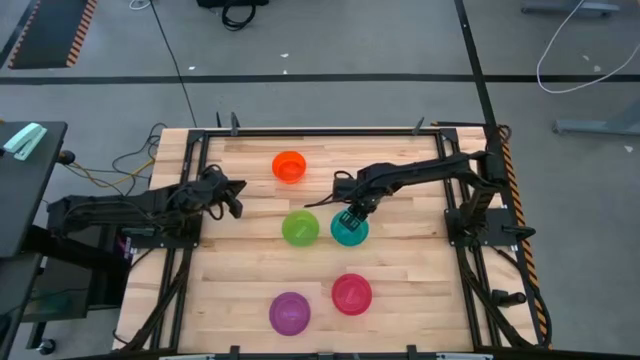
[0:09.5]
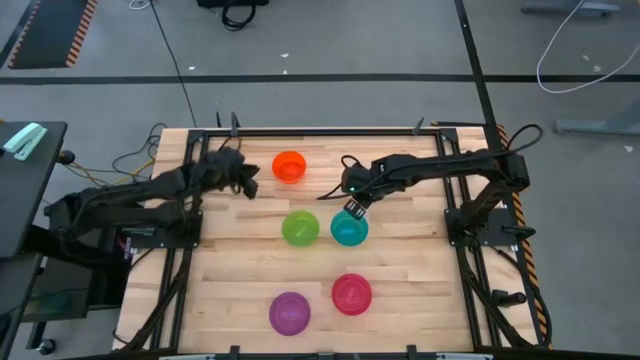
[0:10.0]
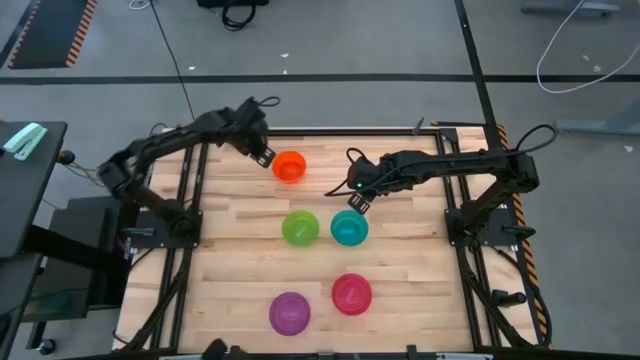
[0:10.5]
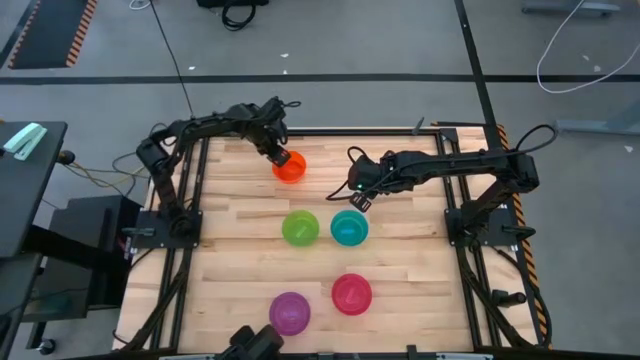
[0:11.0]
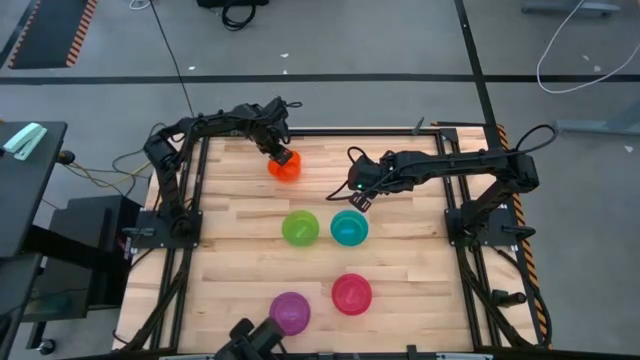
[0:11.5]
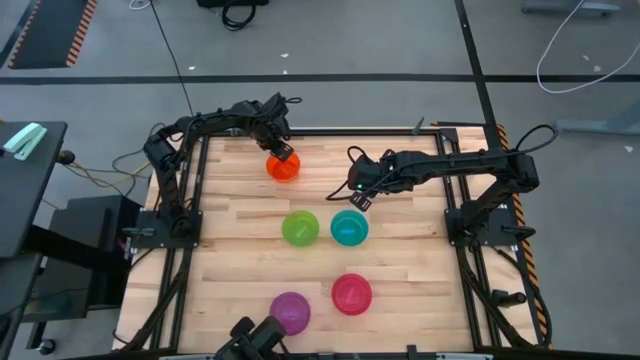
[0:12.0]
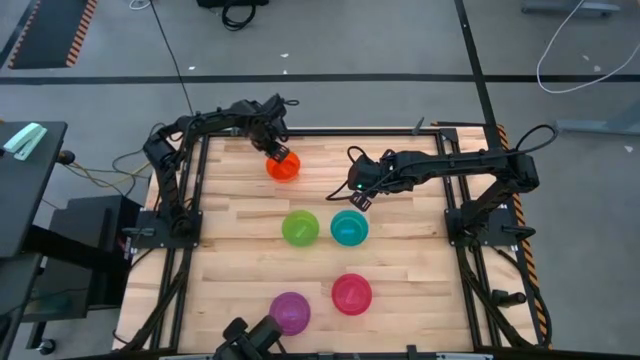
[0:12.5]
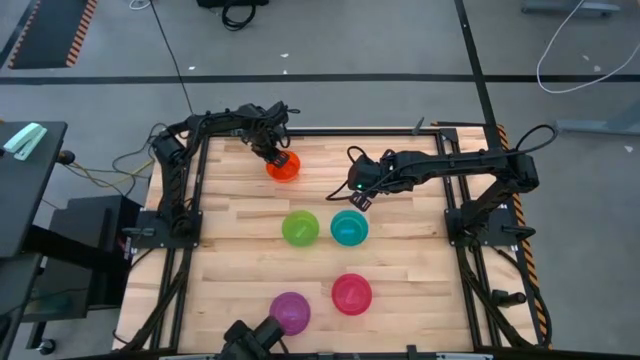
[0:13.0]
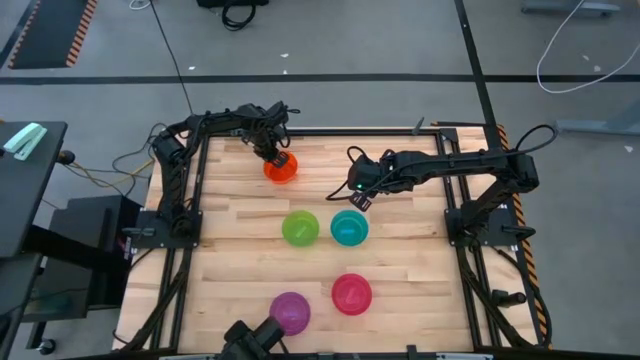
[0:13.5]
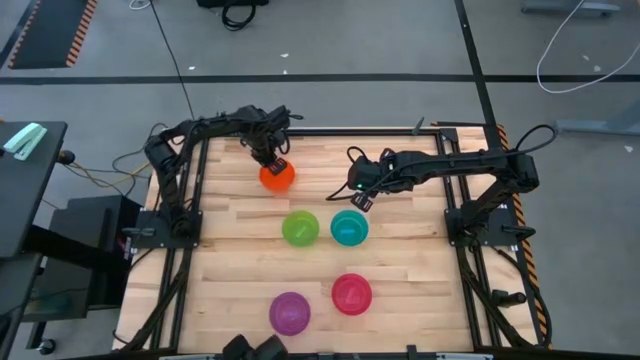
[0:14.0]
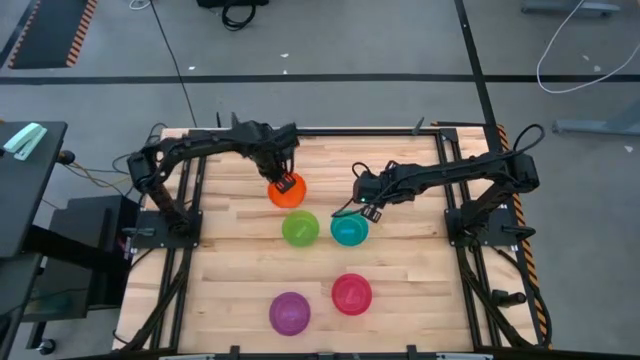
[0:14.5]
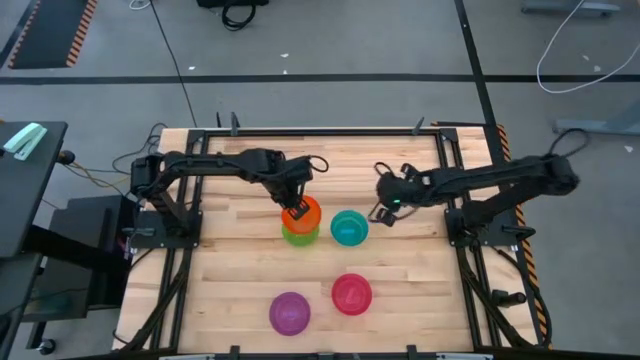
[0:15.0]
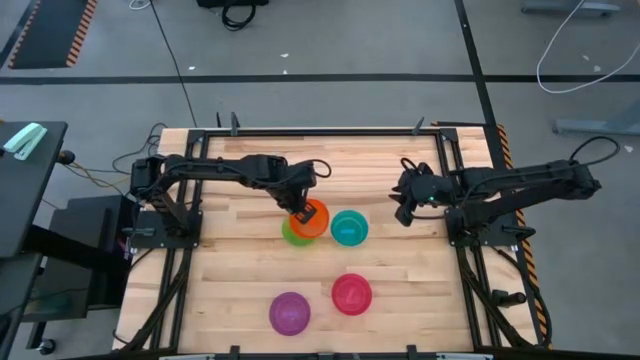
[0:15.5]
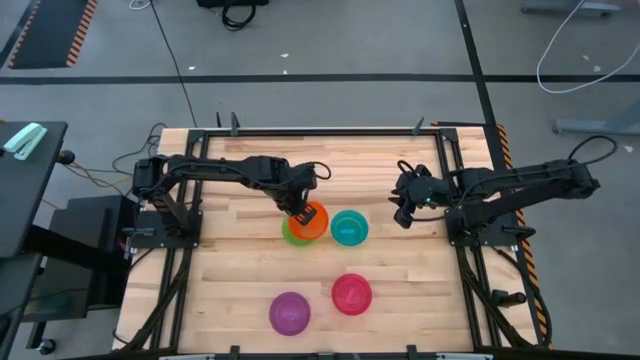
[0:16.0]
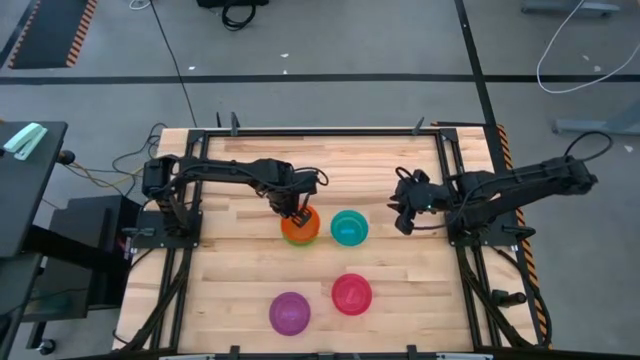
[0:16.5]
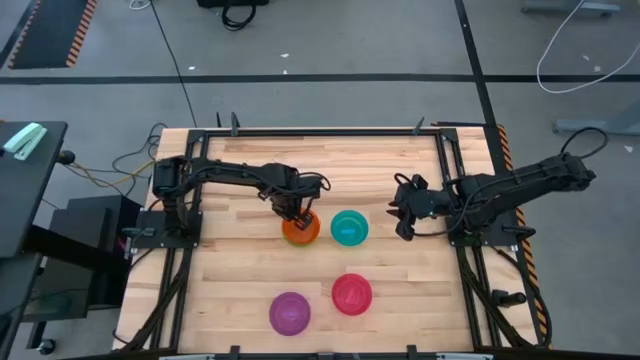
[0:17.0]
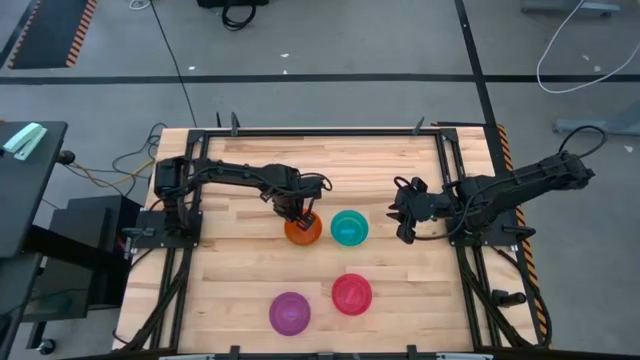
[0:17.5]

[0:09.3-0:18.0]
Task: Nest bowls inside each other
Stack the orange bowl on the green bowl

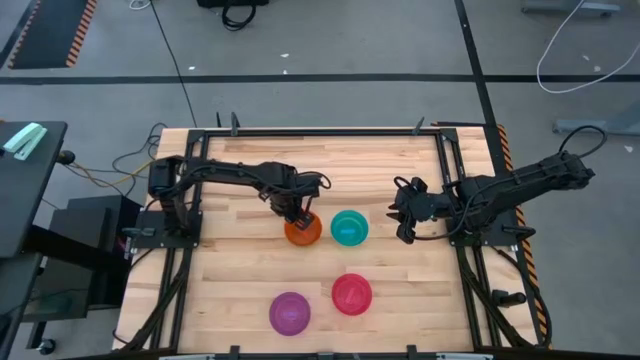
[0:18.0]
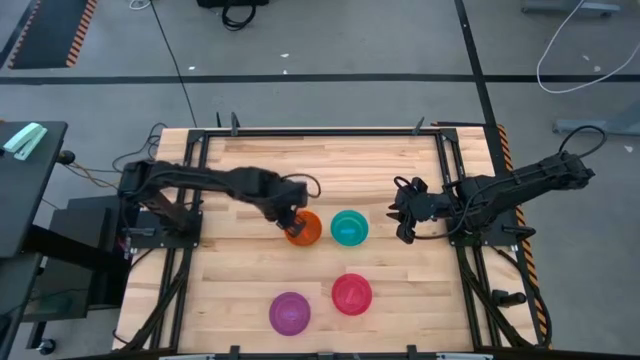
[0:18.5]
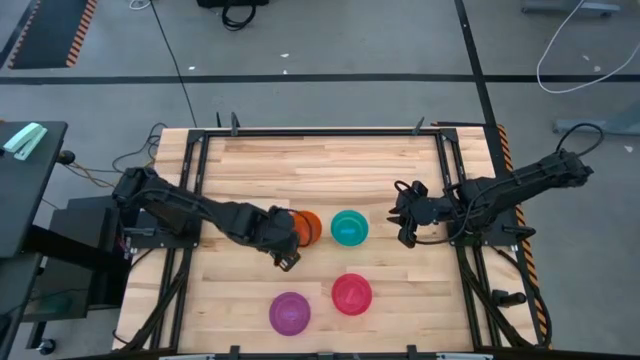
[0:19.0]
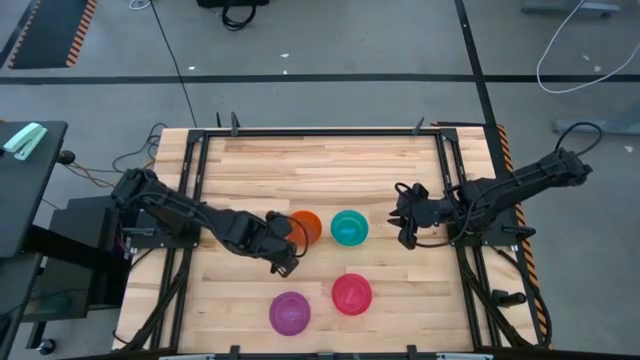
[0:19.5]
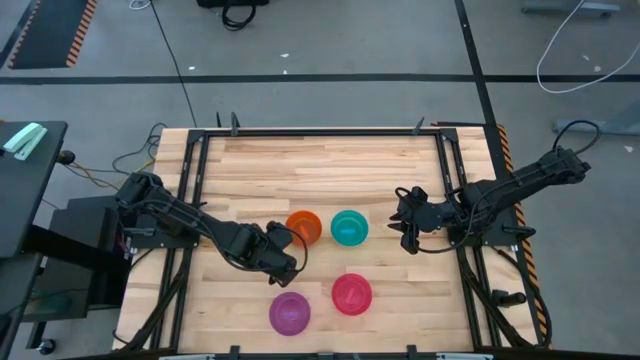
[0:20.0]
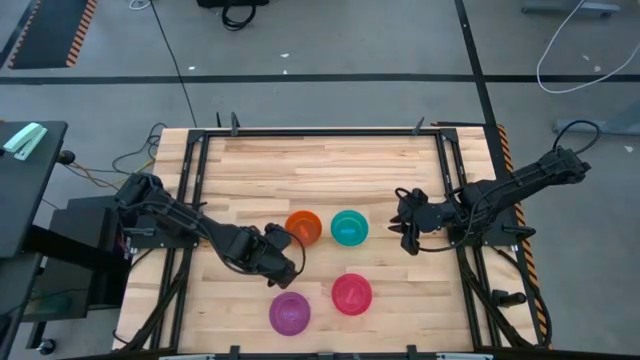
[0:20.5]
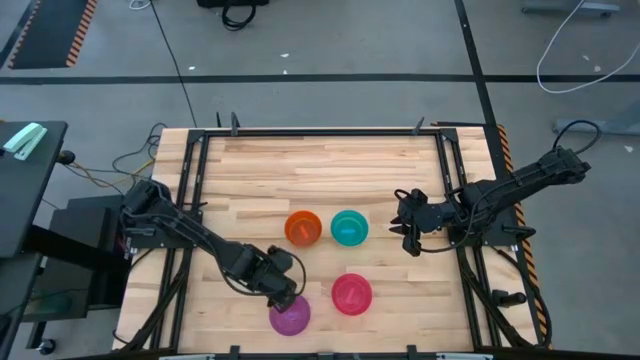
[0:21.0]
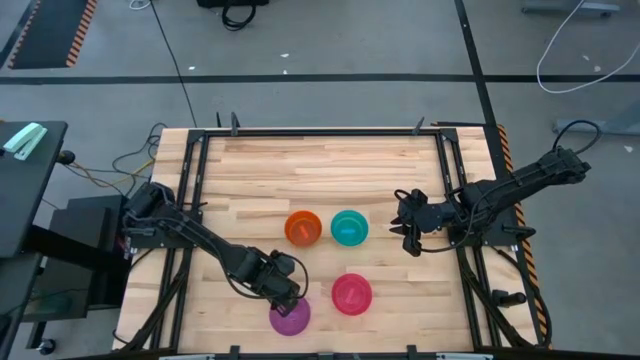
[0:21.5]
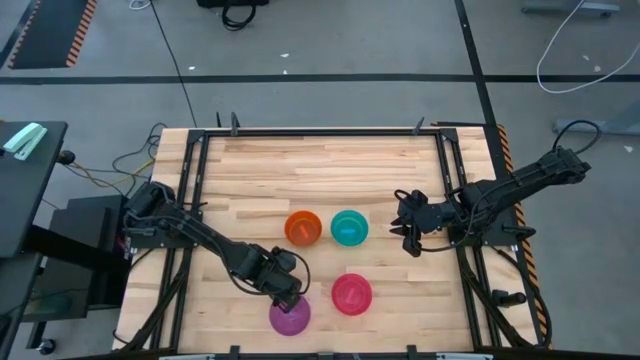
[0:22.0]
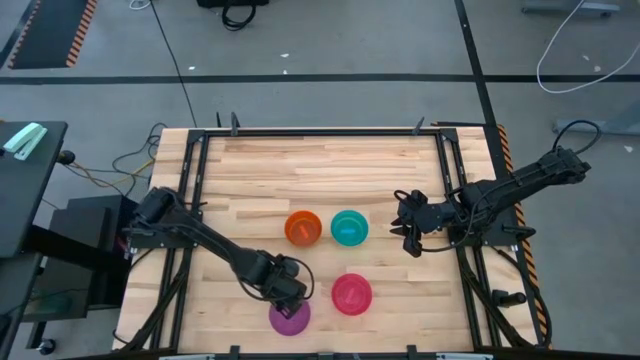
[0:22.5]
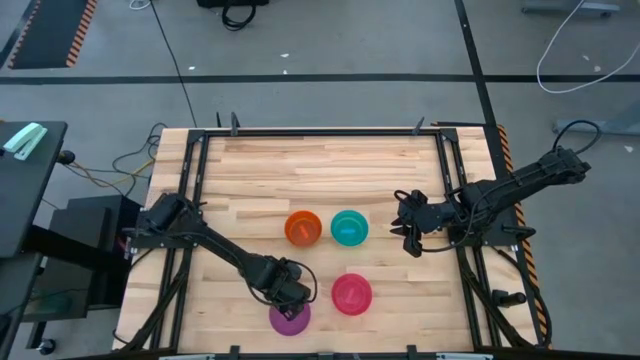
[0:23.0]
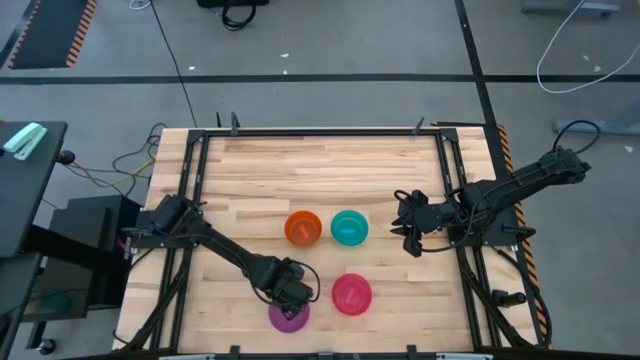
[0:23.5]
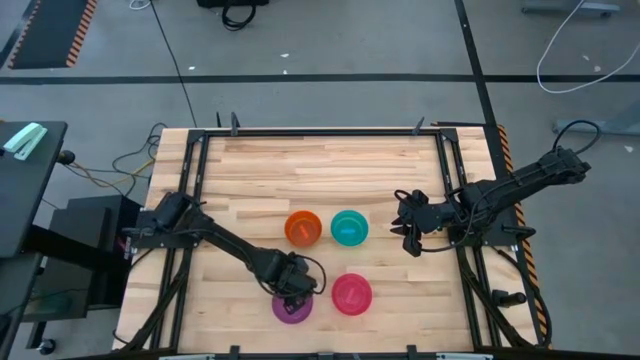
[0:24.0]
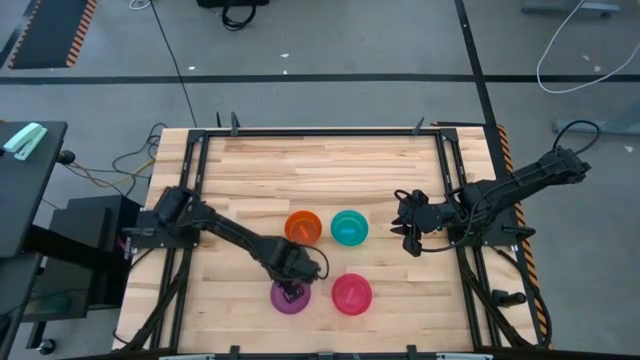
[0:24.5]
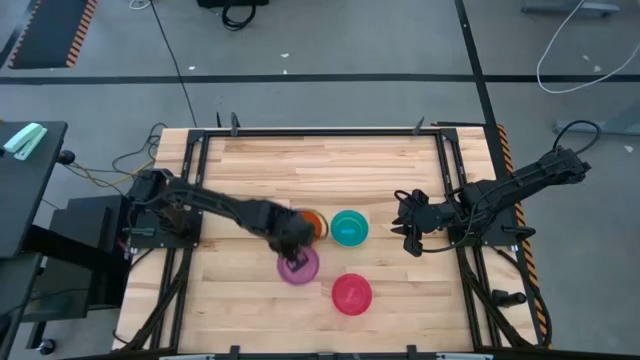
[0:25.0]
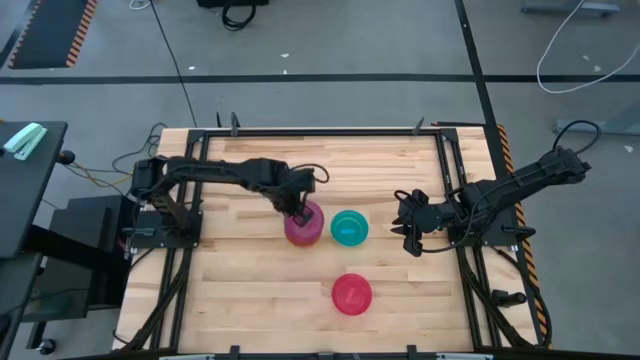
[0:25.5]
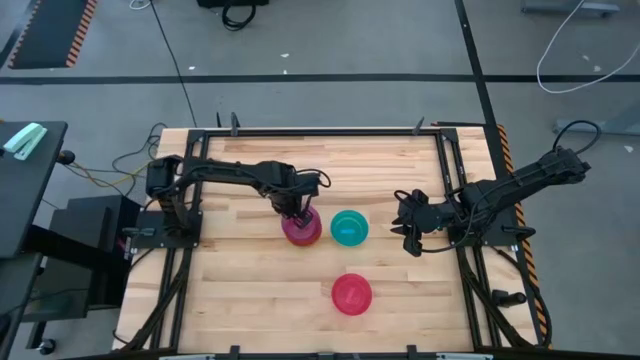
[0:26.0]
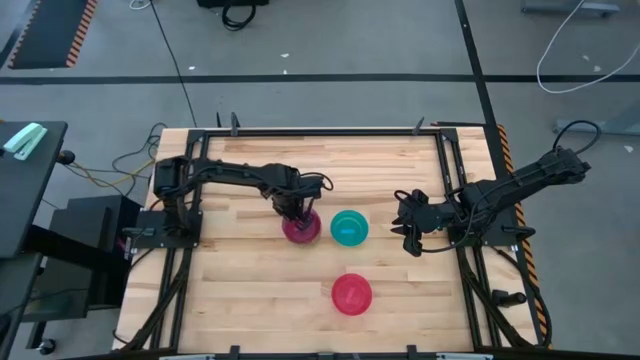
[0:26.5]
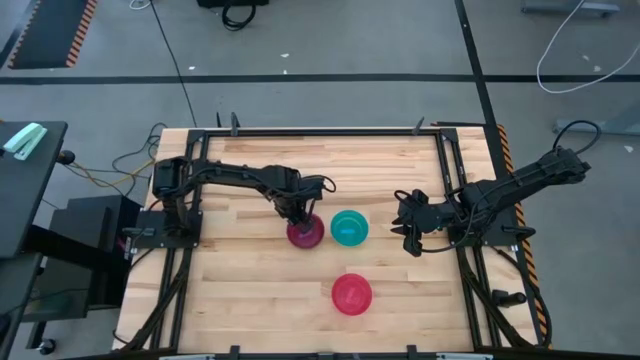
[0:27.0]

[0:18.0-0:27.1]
Stack the purple bowl on the orange bowl

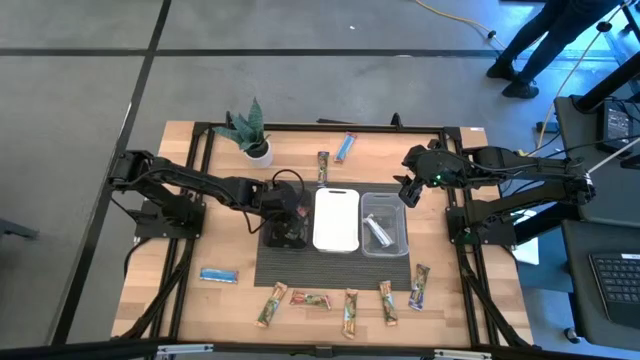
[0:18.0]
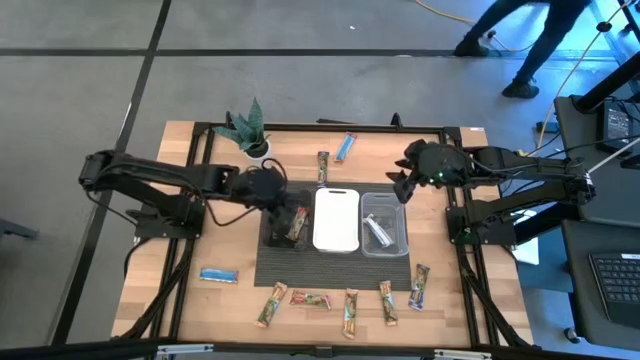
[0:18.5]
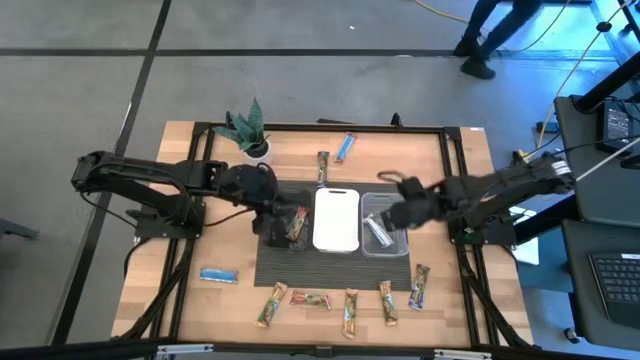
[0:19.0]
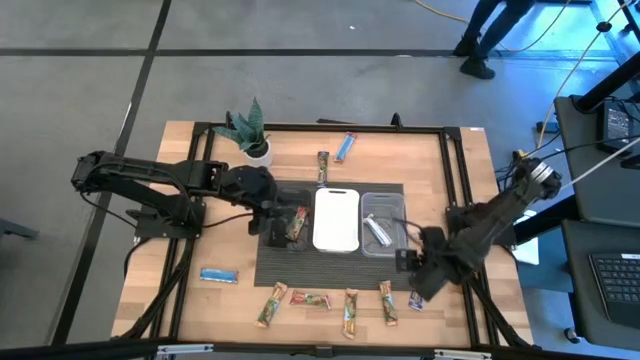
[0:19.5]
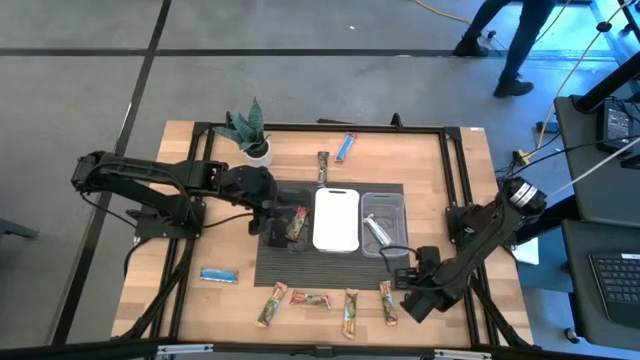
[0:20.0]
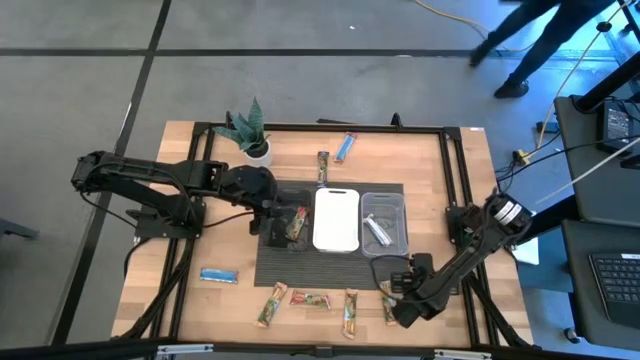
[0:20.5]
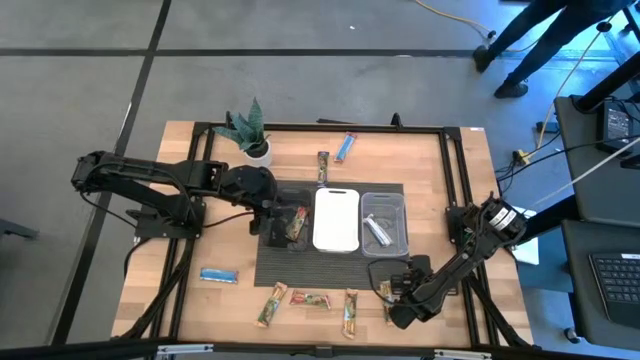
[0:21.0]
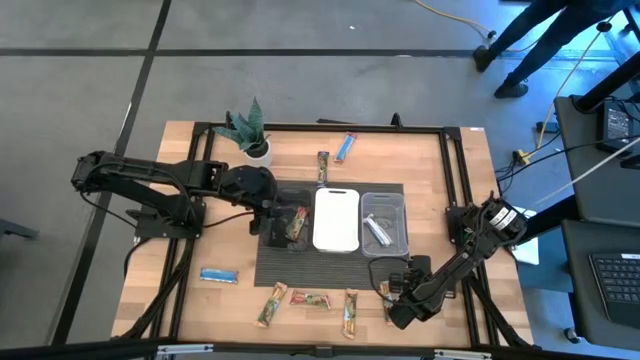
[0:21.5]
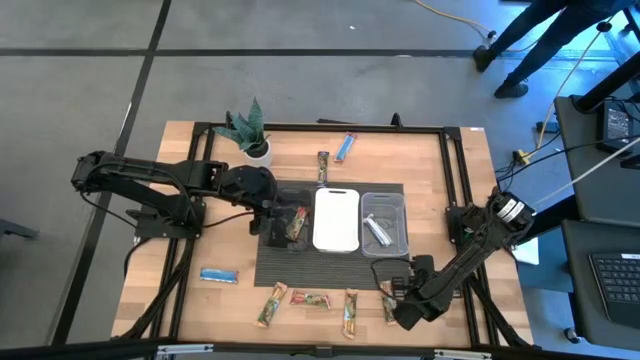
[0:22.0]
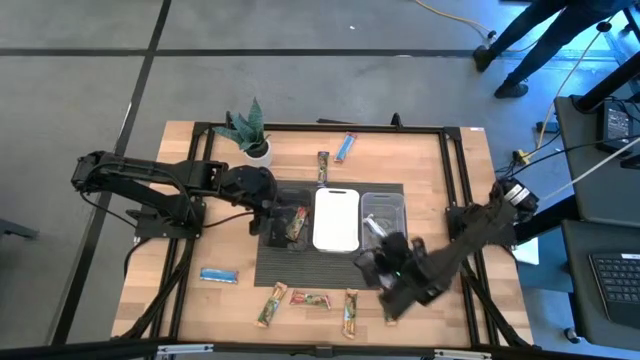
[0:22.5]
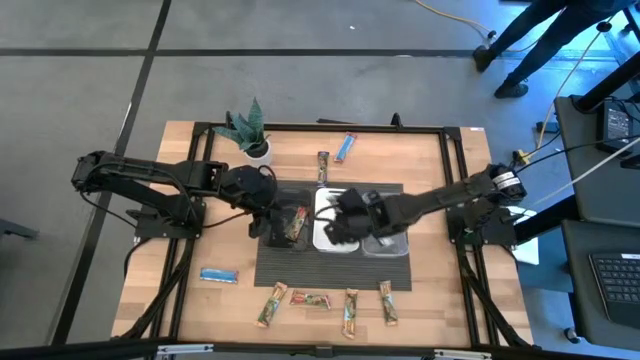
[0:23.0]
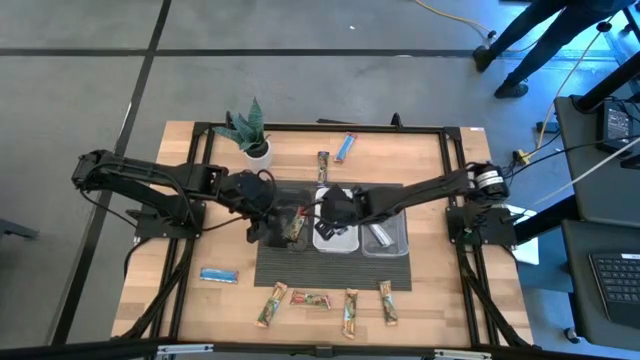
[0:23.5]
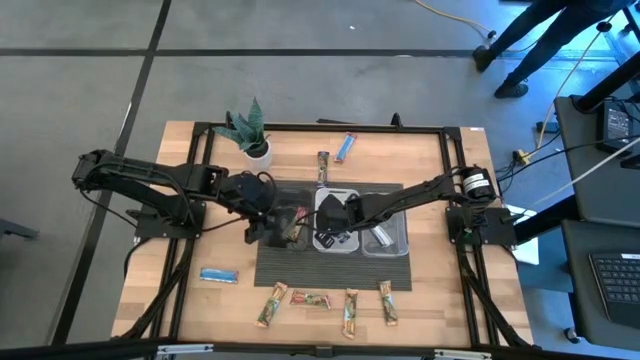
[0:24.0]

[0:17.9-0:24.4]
Task: Pick and place Granola Bars by type
Put the bottom blue granola bar into the white bin
